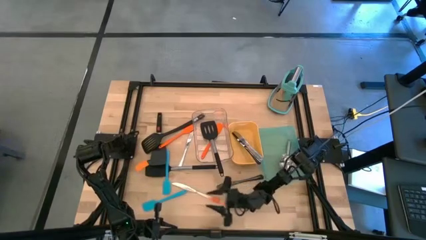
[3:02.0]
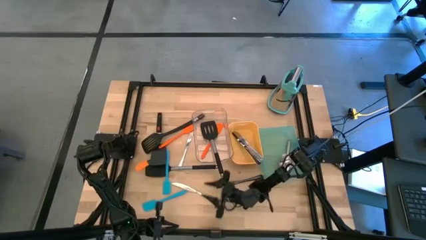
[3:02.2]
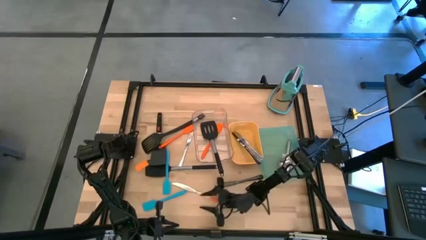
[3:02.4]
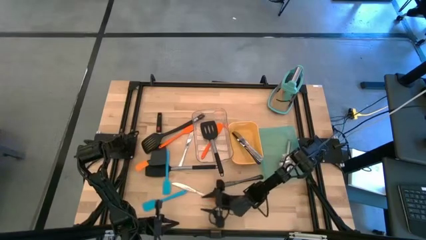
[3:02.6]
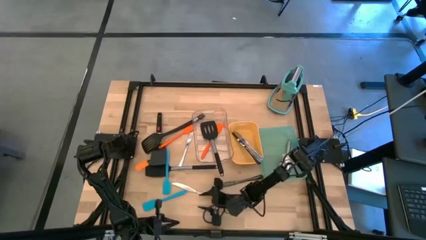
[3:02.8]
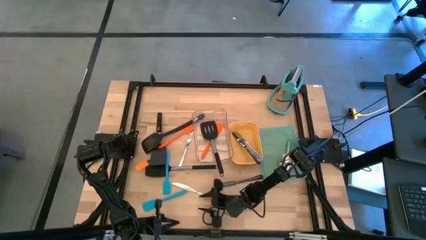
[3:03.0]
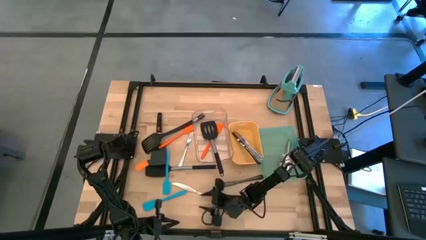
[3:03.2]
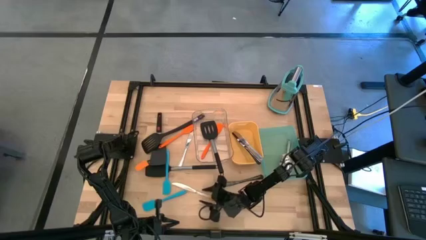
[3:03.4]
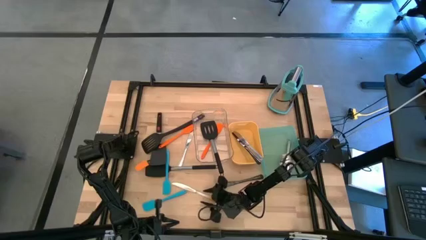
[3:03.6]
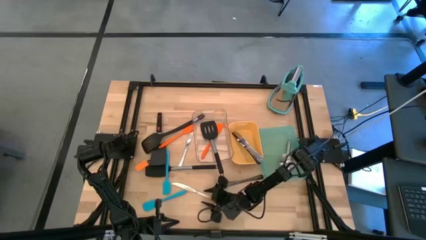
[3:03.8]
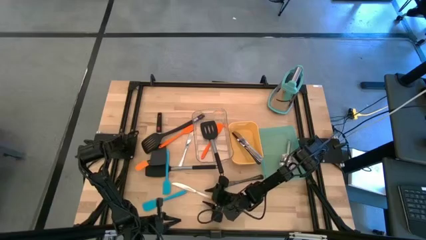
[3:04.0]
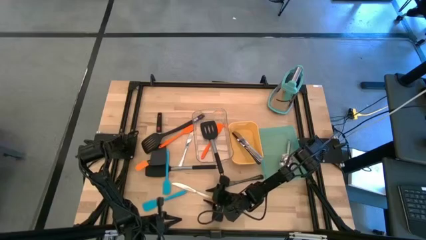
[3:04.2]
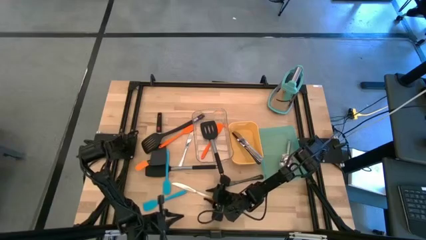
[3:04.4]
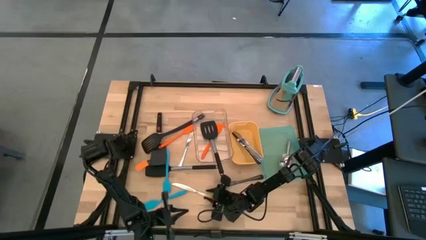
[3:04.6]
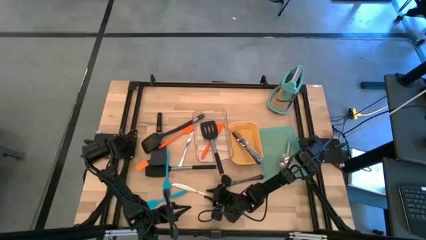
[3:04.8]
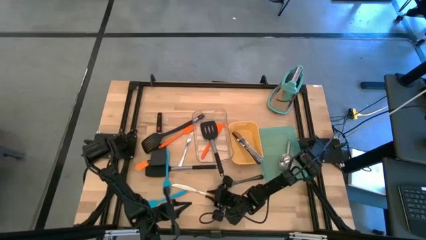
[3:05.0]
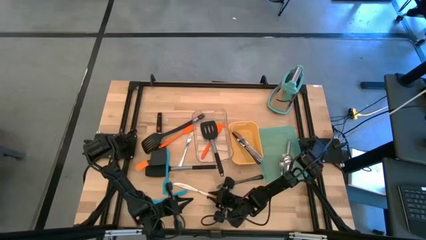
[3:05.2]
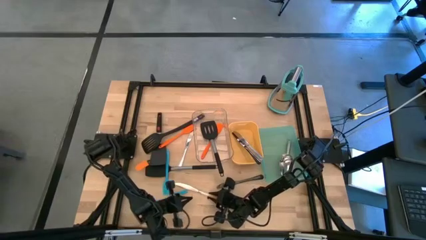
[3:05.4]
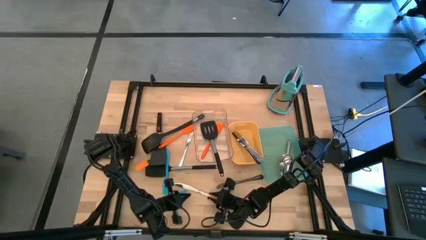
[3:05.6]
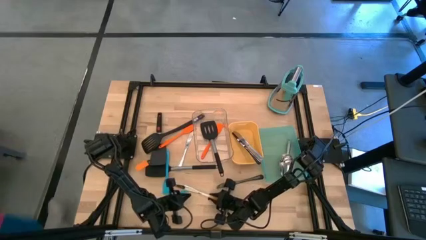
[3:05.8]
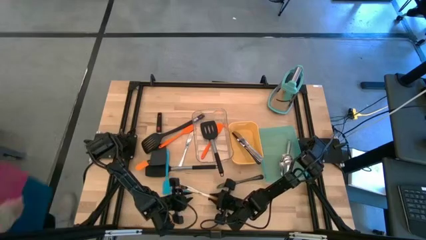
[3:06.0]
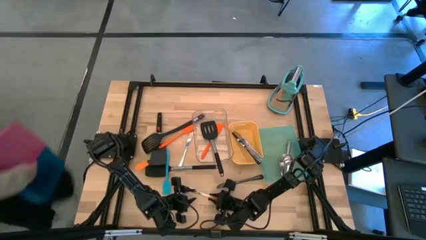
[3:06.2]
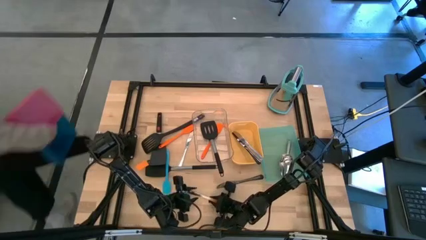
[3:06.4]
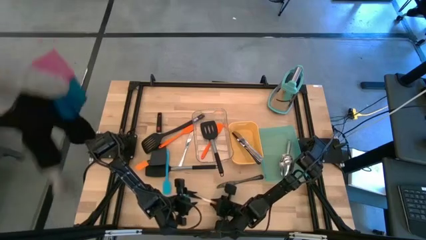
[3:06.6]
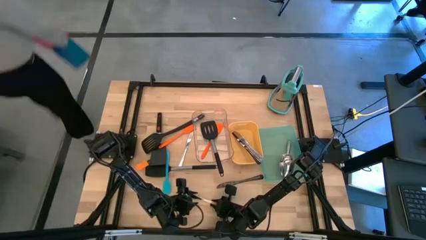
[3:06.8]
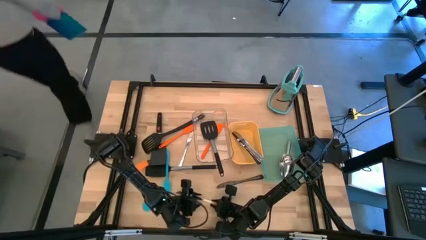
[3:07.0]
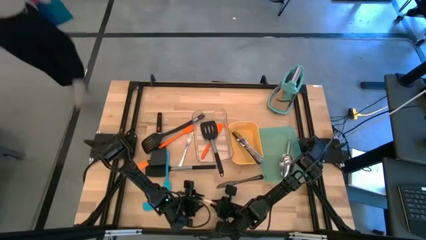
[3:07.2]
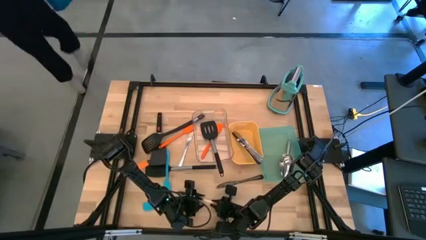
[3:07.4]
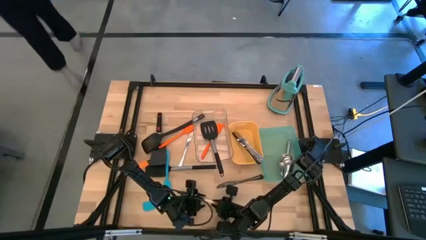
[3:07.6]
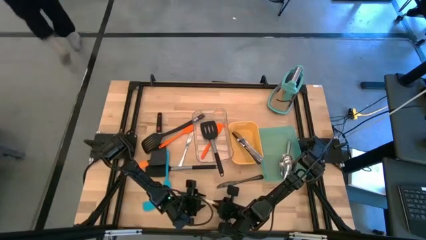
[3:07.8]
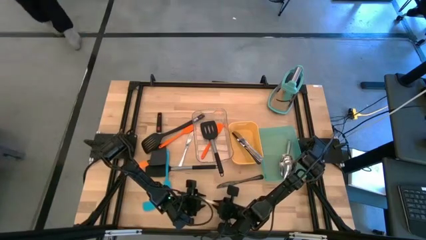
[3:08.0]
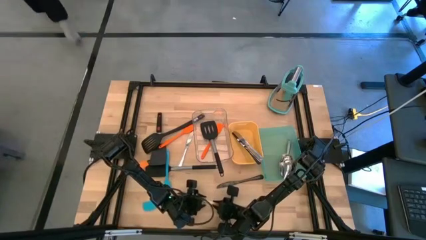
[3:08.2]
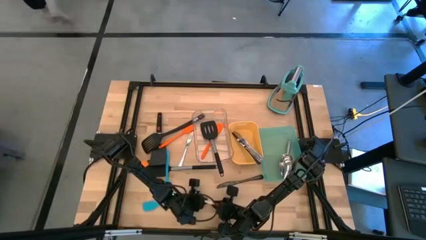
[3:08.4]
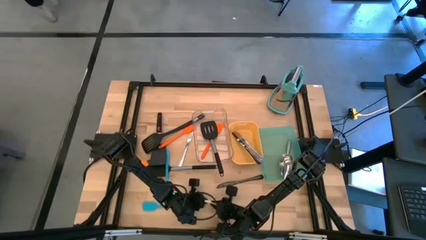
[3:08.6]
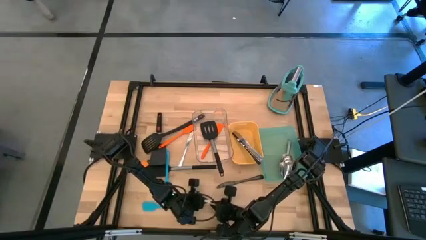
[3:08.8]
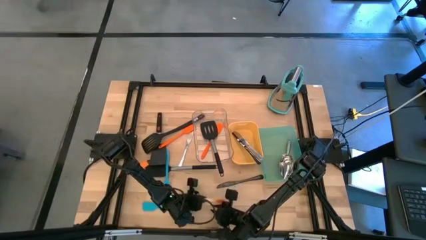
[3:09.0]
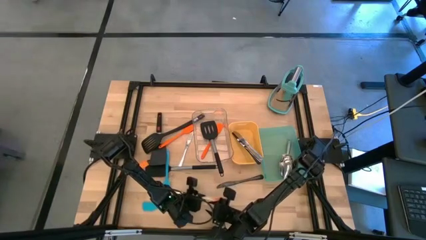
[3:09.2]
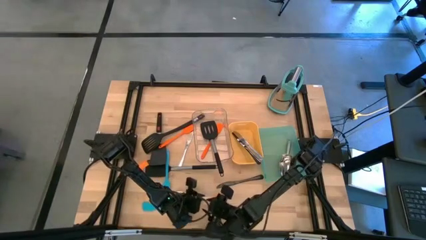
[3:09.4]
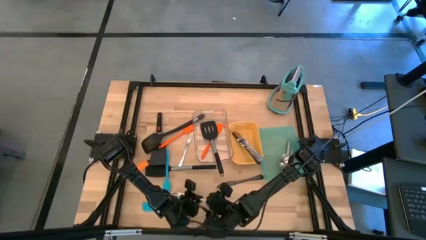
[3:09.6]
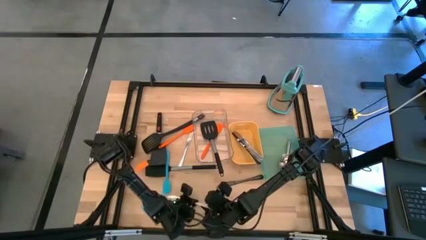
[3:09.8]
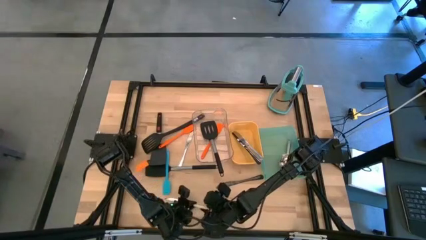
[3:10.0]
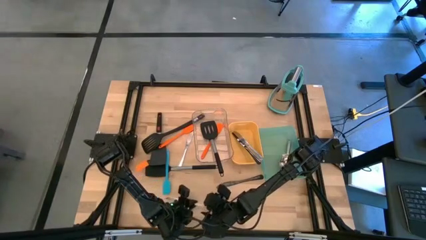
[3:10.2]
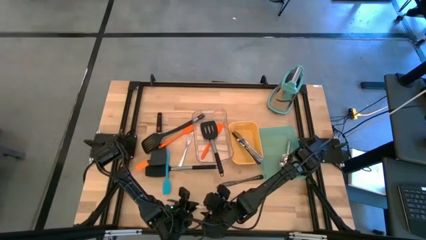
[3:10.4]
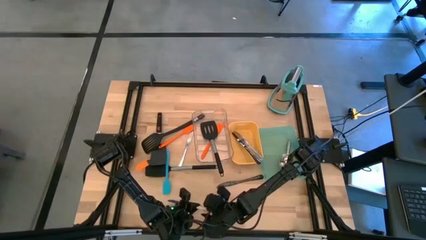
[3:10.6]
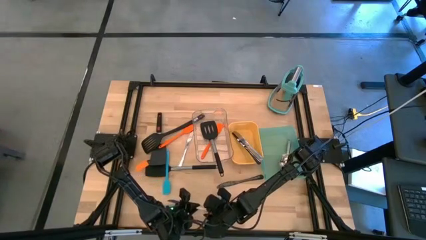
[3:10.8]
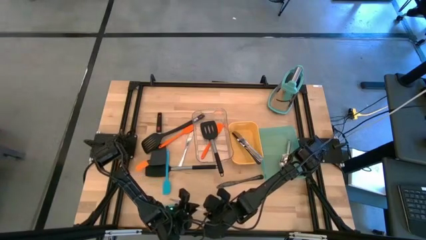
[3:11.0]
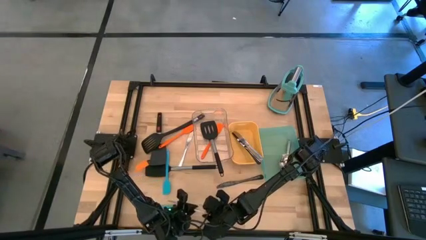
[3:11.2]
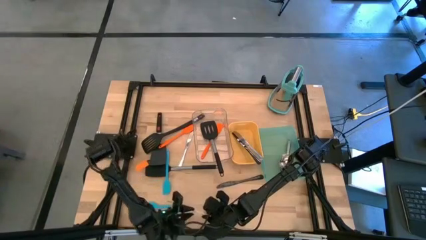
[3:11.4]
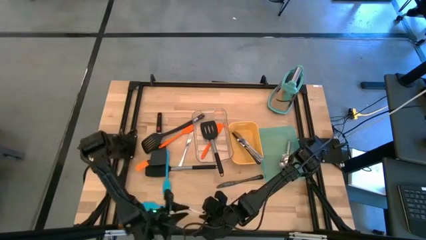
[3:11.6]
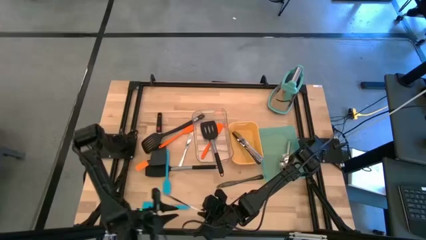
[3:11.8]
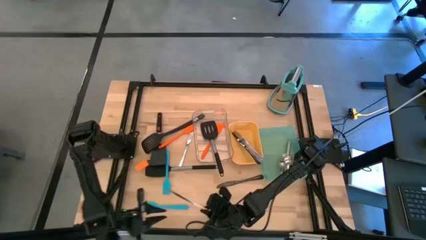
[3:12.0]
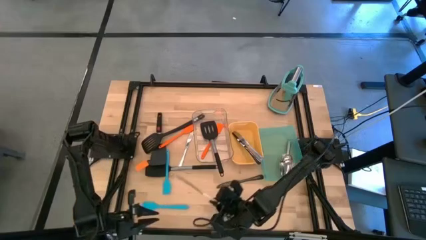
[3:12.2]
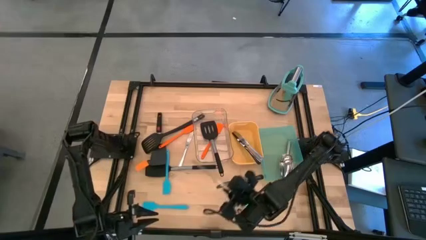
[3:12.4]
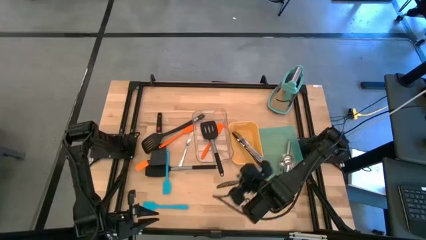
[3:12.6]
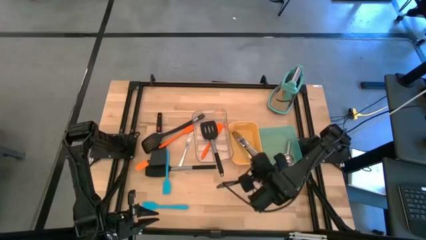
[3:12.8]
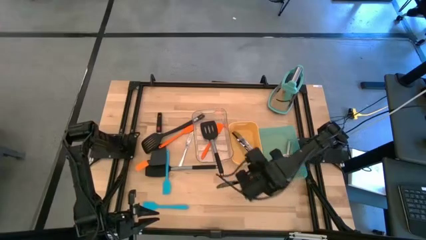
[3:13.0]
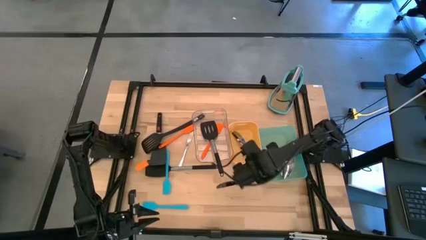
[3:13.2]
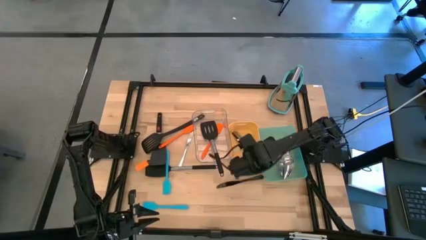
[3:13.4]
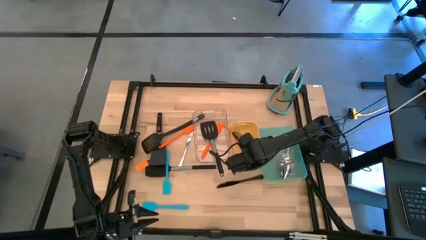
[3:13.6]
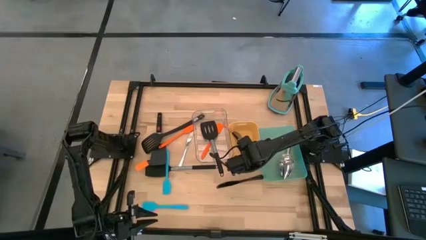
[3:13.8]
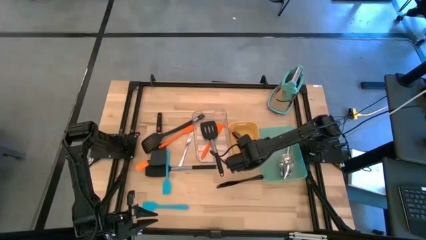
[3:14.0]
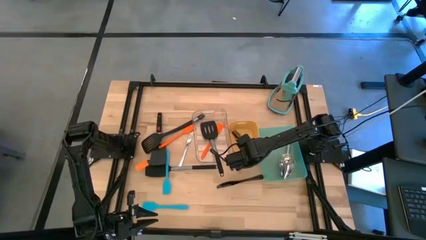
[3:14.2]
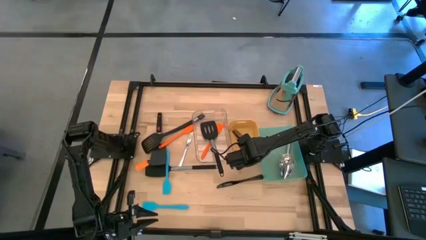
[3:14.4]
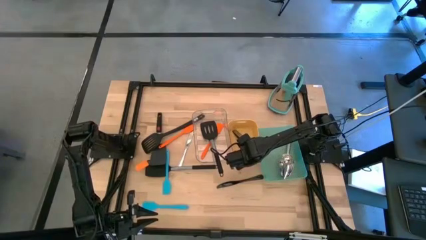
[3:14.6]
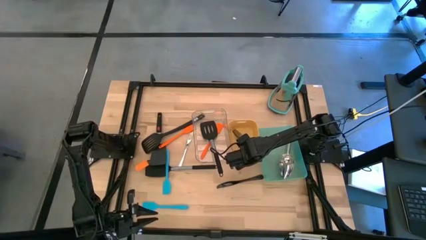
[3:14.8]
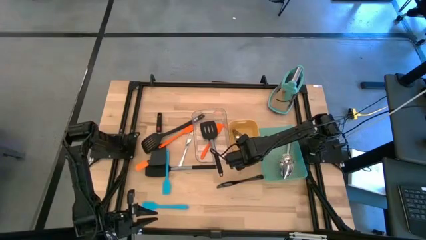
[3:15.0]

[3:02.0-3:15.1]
Task: Pick & Place Kitchen Items
Put the orange table knife into the yellow bin
